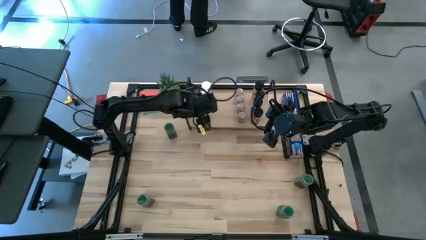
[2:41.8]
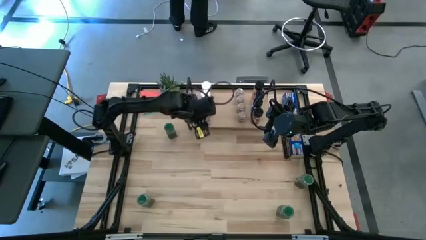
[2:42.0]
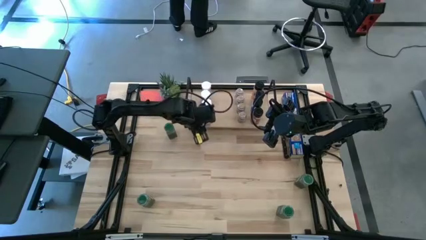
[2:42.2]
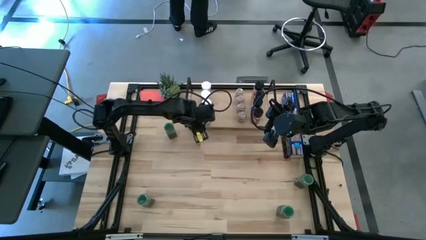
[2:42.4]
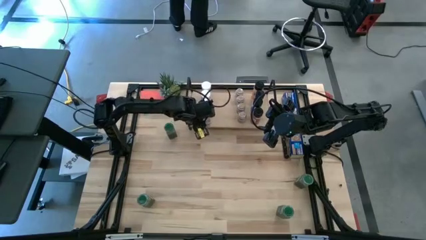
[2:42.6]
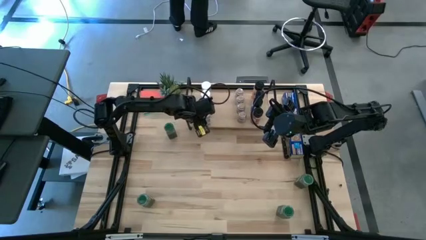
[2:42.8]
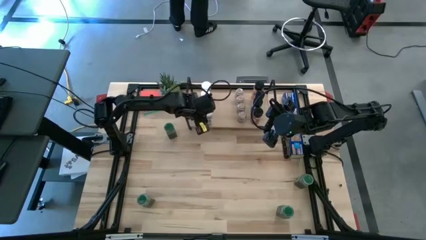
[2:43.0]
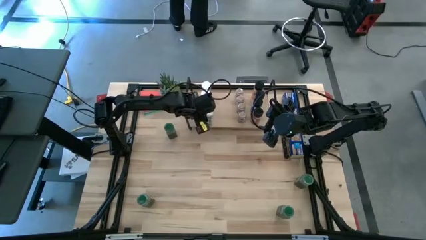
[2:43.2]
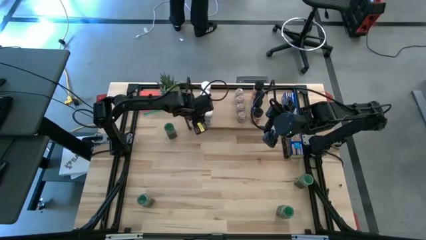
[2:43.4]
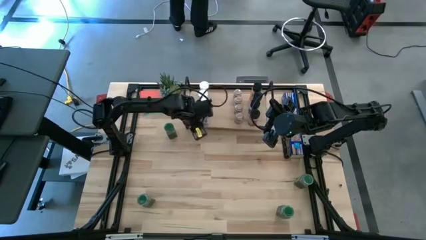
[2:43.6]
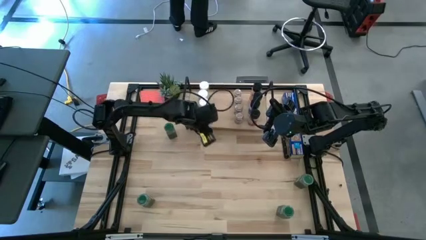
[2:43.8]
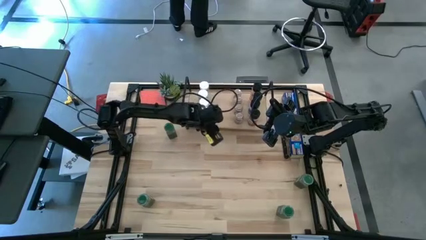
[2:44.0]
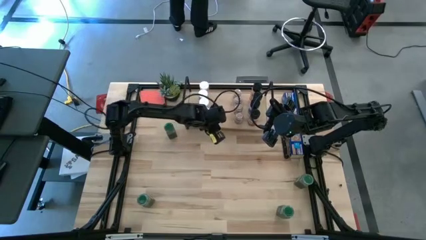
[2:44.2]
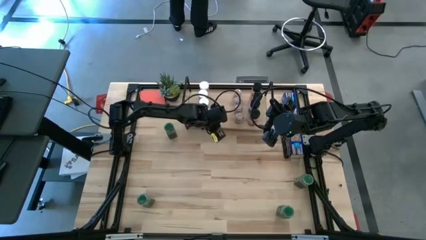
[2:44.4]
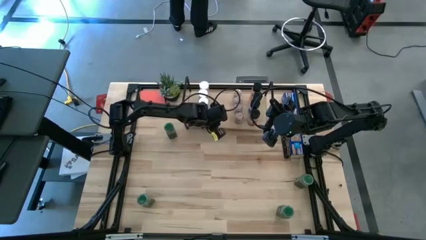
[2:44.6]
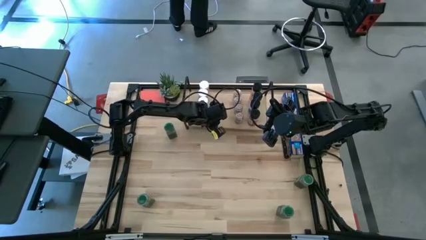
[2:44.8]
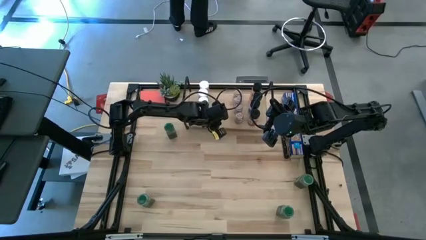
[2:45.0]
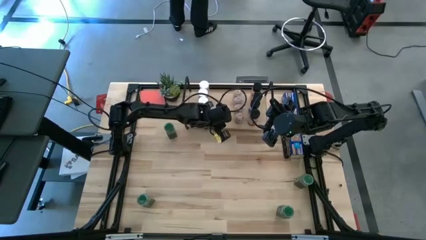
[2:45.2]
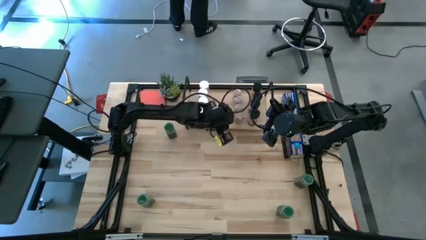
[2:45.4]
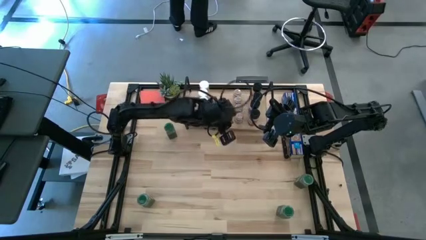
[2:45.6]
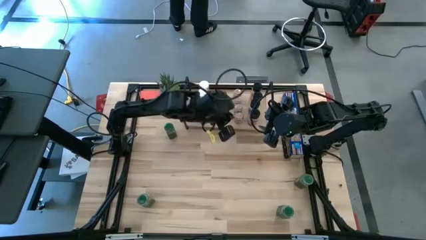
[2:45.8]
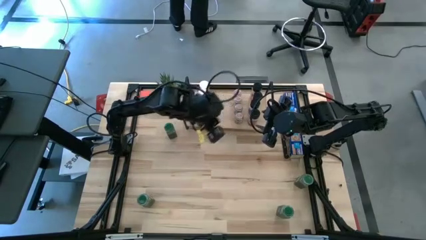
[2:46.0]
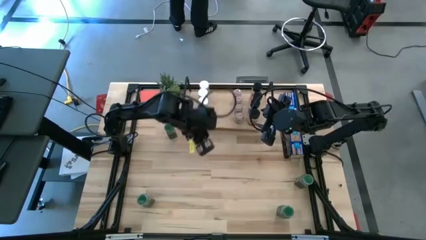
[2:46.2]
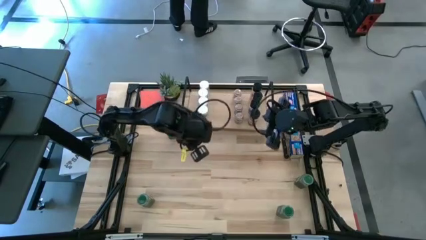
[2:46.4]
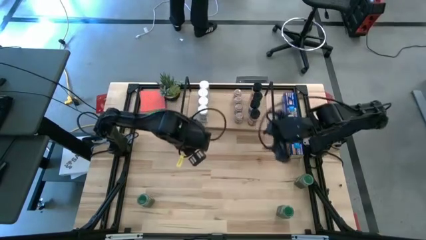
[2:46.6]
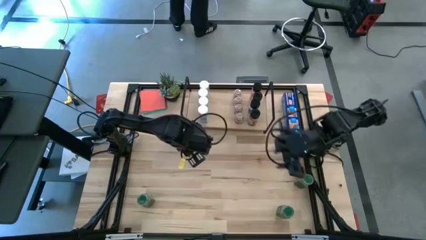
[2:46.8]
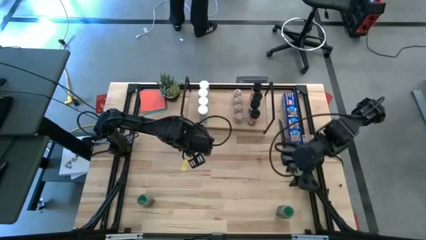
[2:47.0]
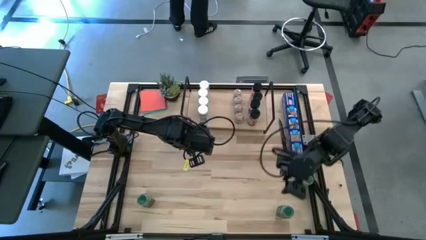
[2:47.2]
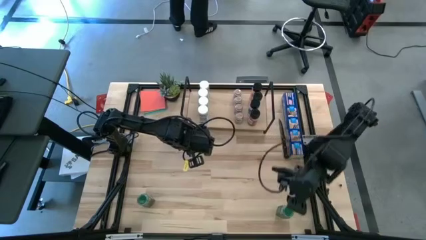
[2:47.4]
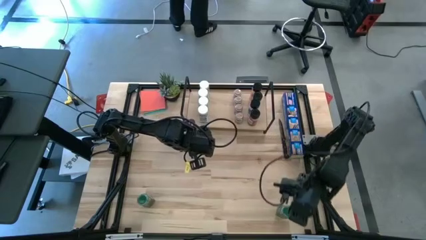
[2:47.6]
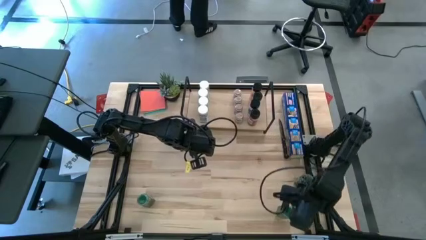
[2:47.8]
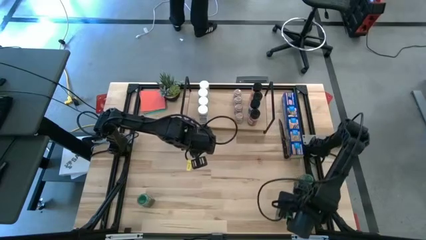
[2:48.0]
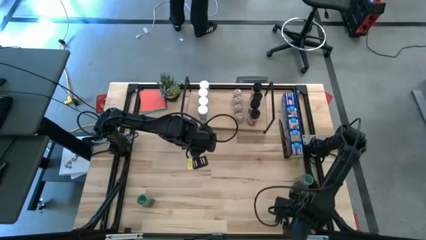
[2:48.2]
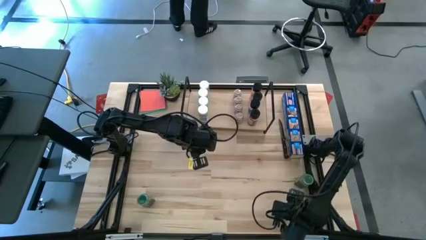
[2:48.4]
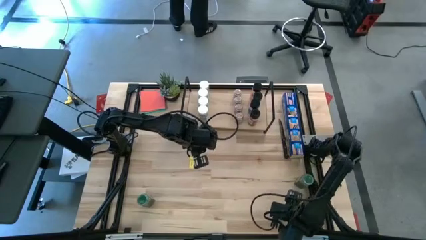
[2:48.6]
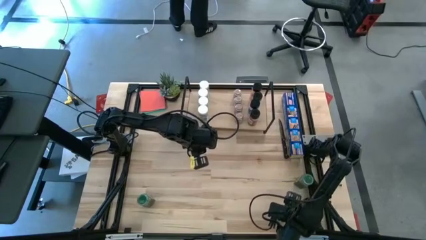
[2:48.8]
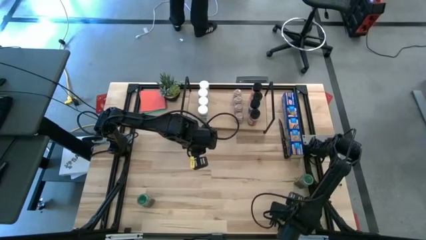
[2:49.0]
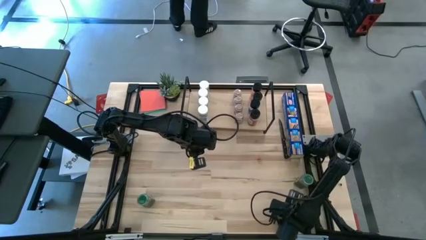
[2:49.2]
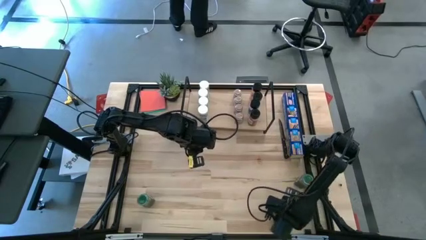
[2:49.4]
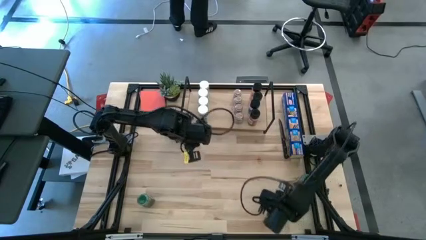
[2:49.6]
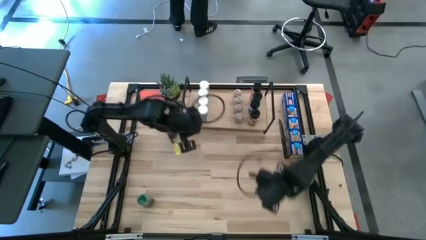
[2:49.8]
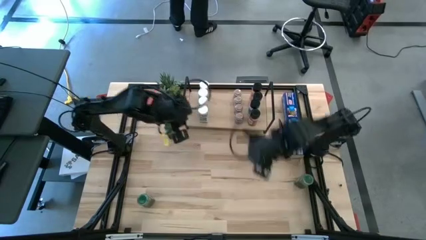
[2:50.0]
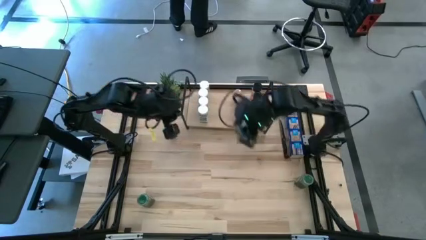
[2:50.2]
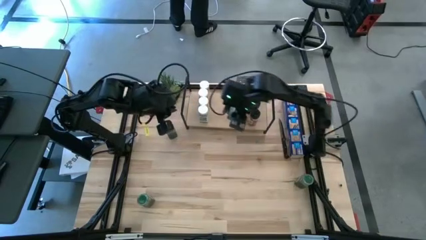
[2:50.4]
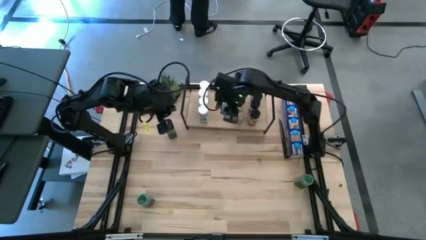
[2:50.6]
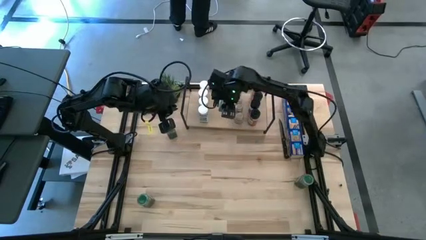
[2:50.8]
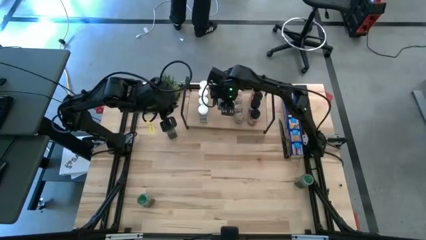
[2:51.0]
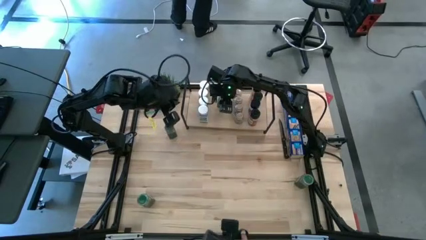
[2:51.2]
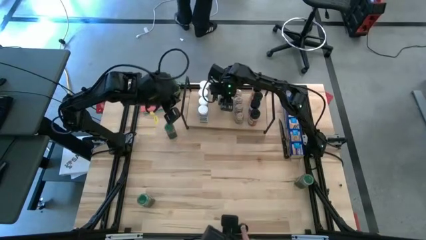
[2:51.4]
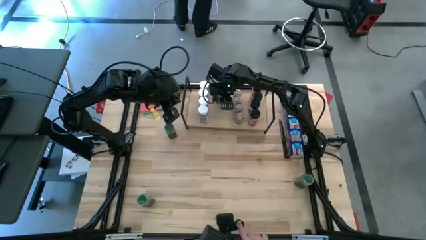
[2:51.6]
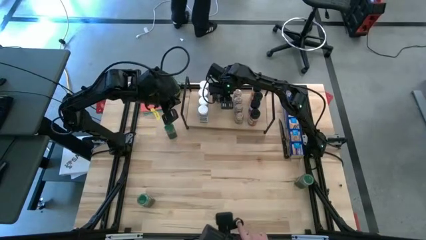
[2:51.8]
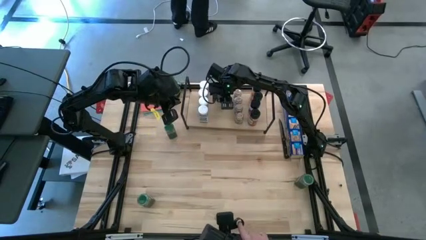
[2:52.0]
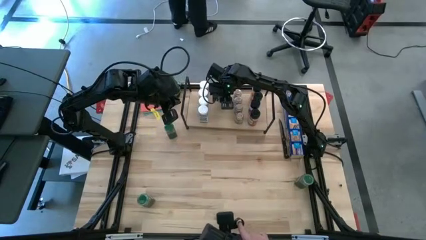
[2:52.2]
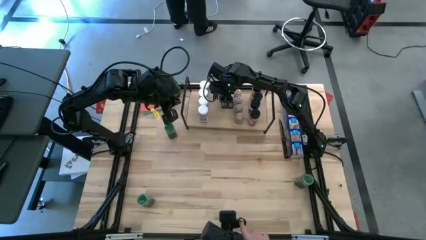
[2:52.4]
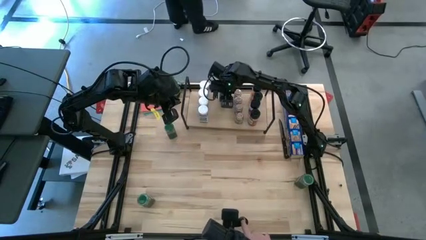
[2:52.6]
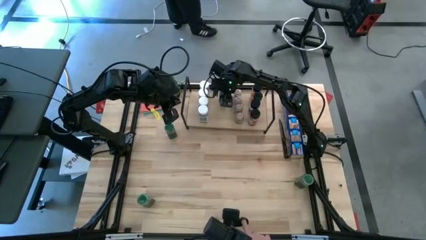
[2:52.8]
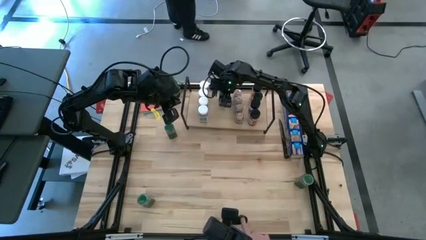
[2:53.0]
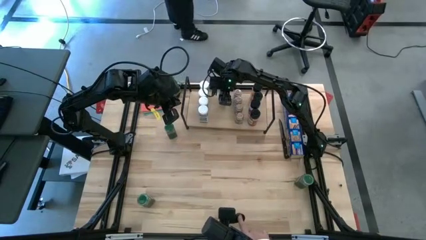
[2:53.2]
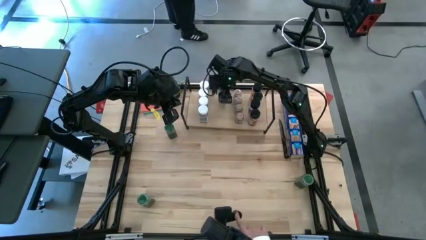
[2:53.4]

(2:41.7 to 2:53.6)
Task: Shelf spices
Put the green seasoning bottle on the shelf

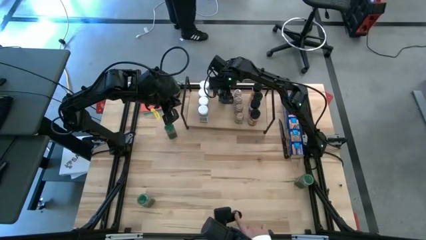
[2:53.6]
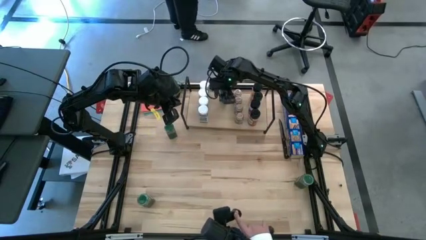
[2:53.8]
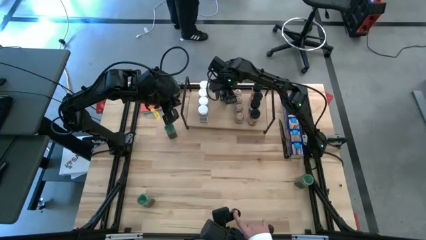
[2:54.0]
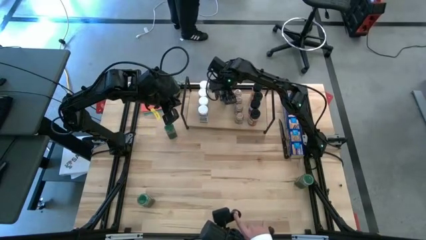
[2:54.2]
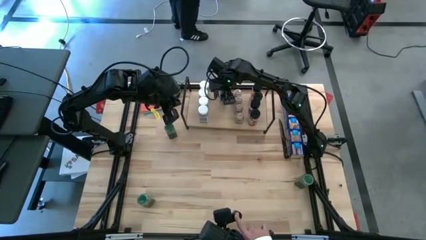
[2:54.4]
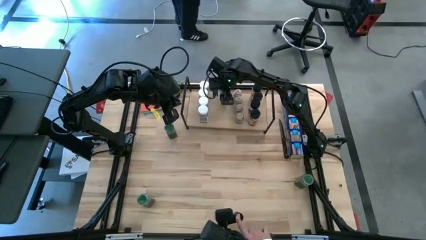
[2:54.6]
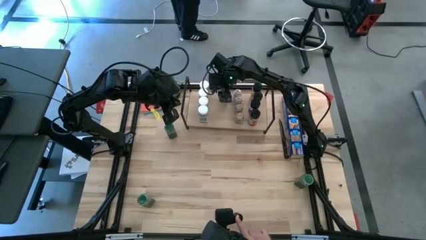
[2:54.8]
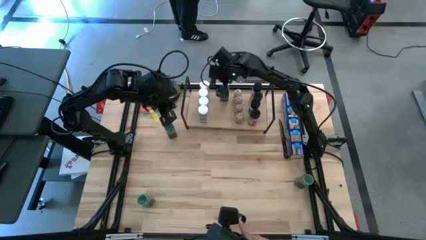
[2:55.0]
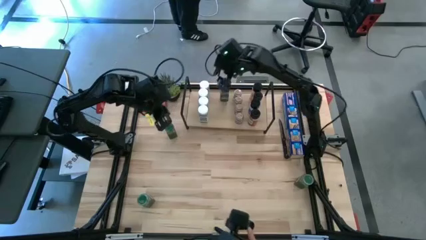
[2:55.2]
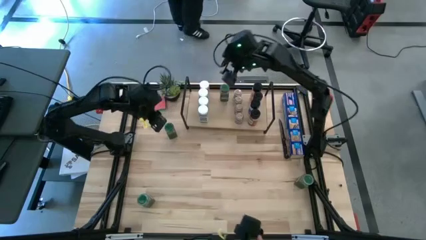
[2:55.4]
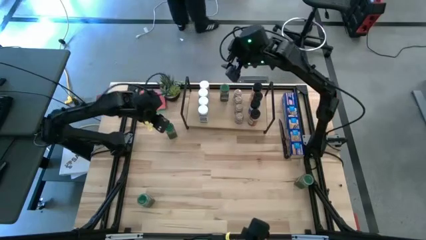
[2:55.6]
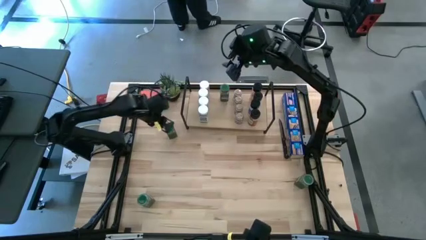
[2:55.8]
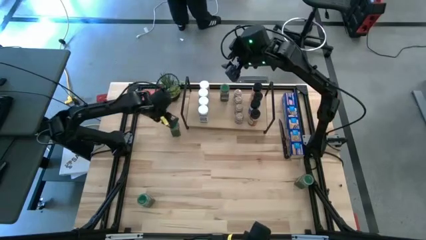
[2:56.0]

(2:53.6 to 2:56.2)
Put the green seasoning bottle on the shelf, aligned with the other green bottle
